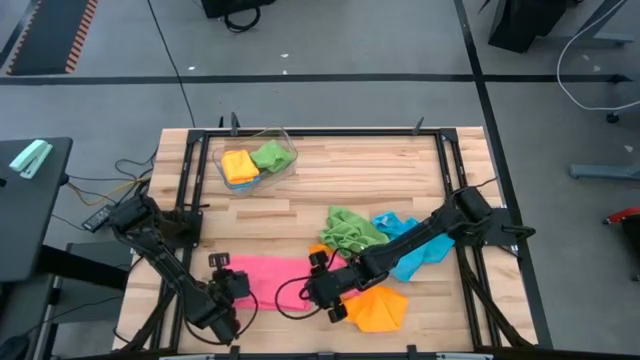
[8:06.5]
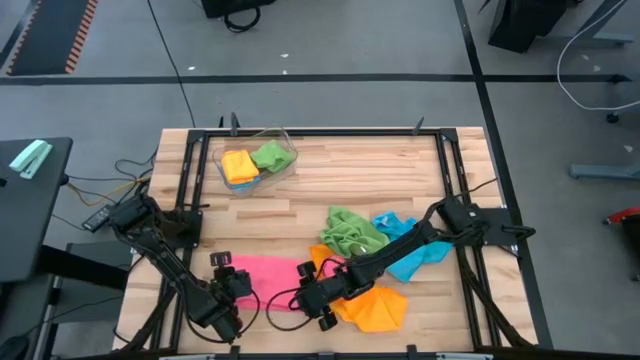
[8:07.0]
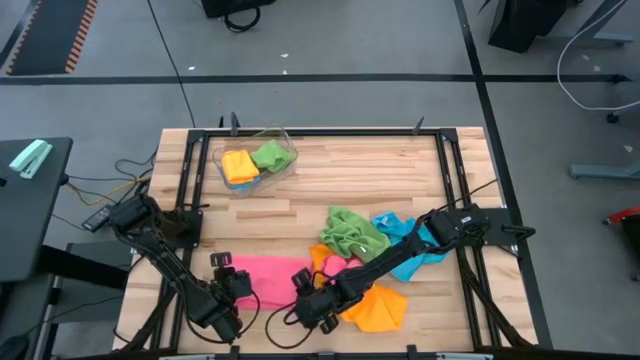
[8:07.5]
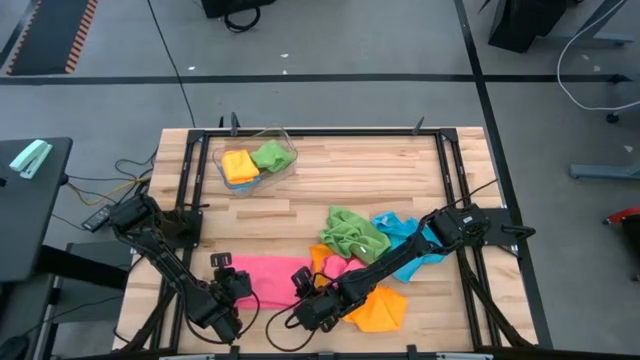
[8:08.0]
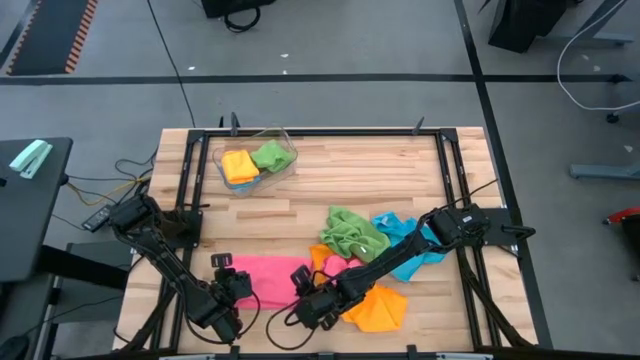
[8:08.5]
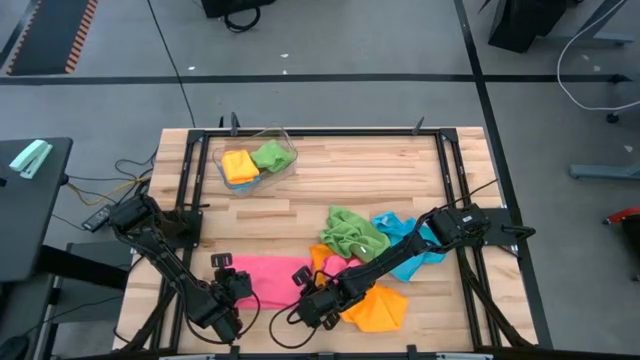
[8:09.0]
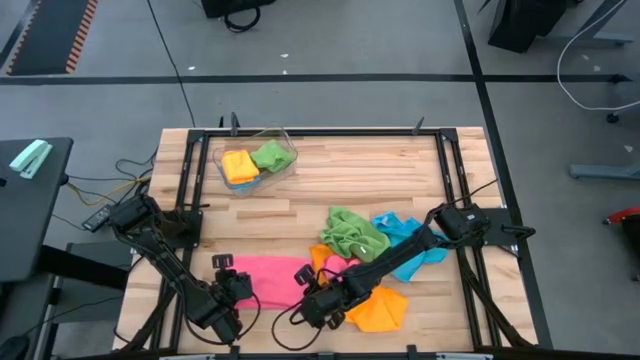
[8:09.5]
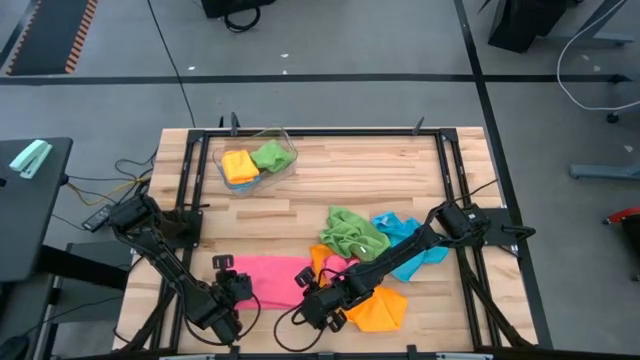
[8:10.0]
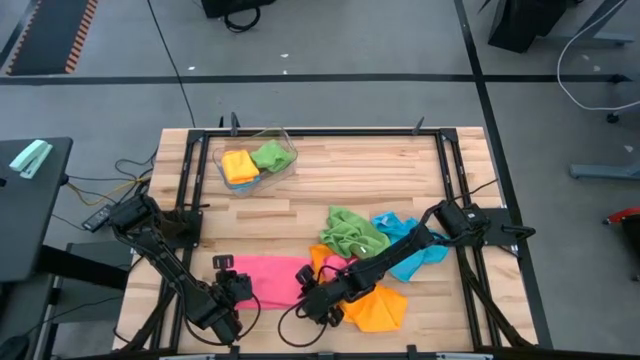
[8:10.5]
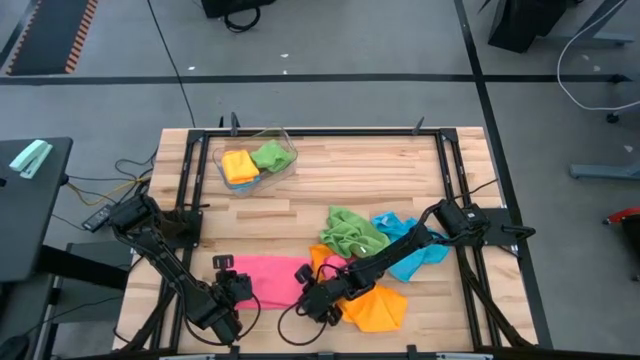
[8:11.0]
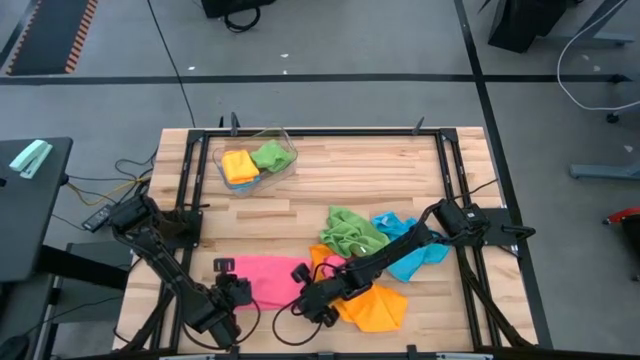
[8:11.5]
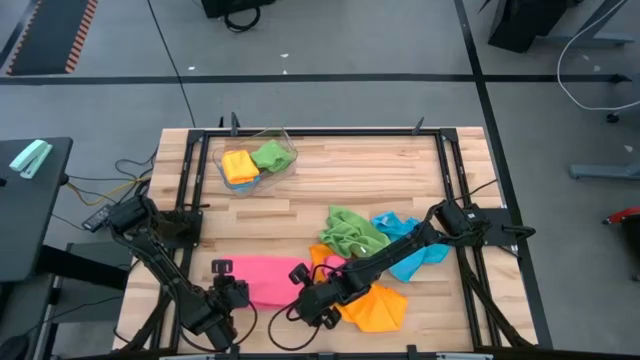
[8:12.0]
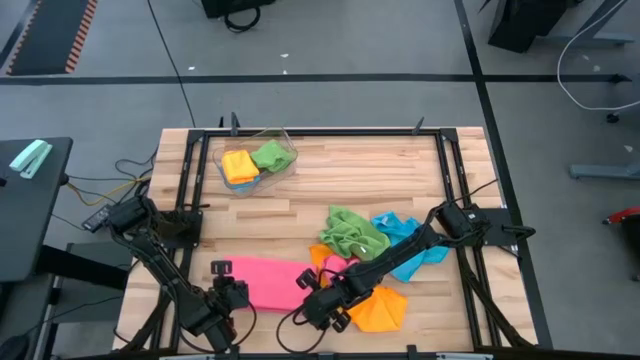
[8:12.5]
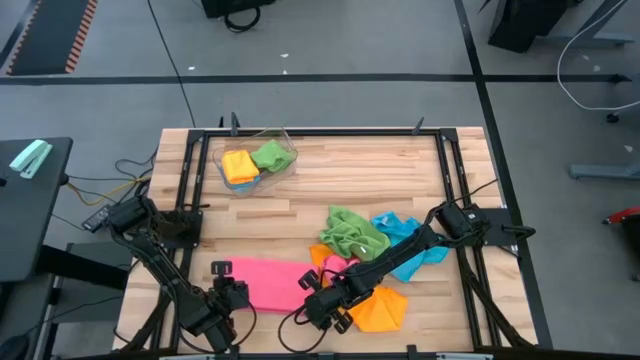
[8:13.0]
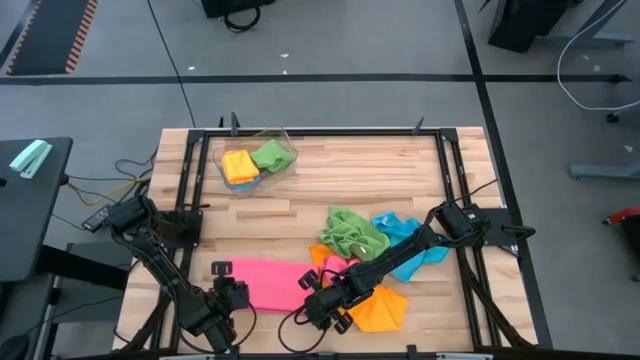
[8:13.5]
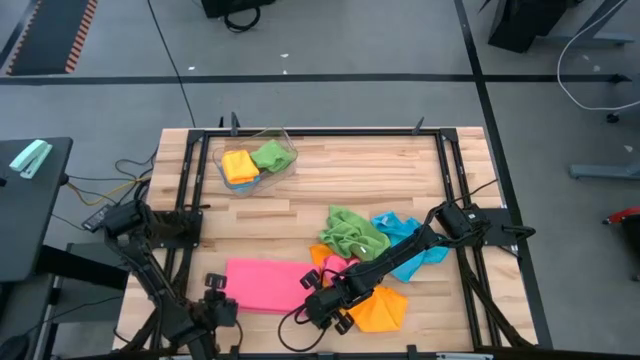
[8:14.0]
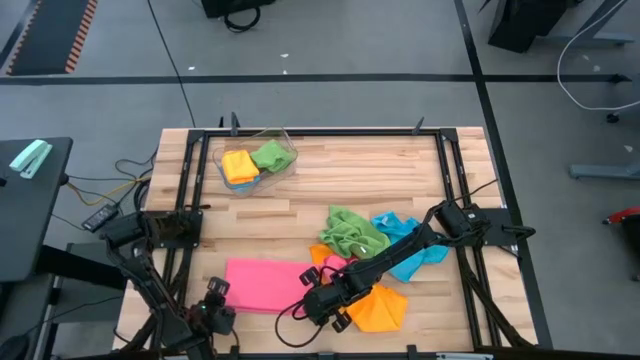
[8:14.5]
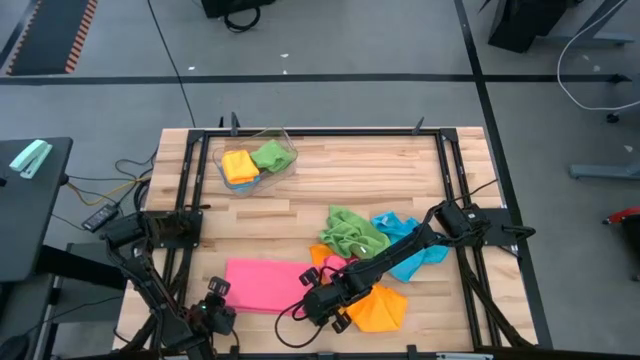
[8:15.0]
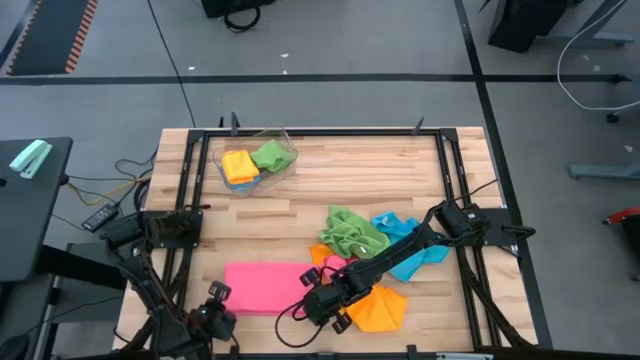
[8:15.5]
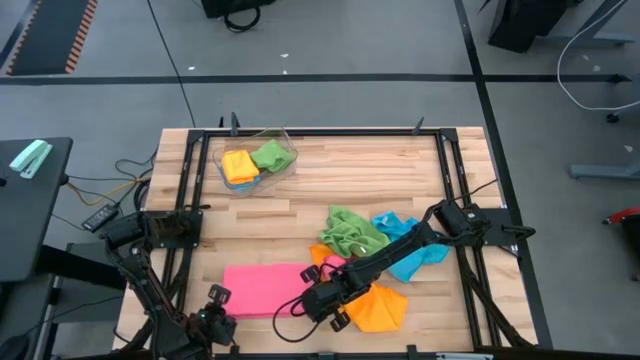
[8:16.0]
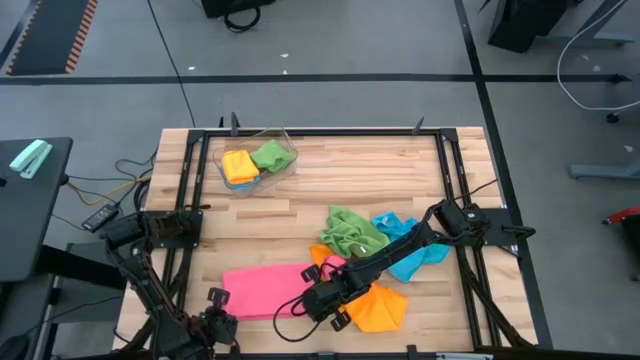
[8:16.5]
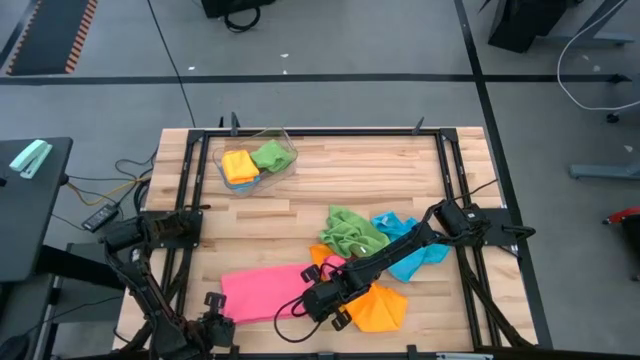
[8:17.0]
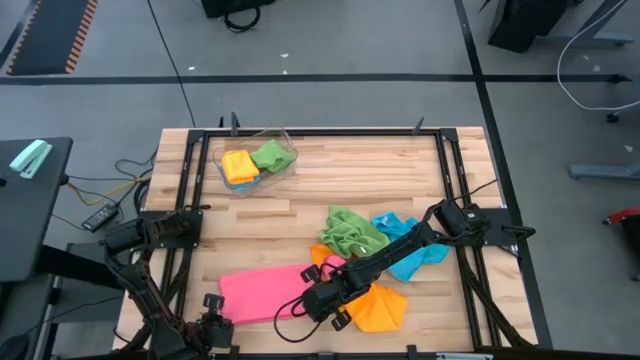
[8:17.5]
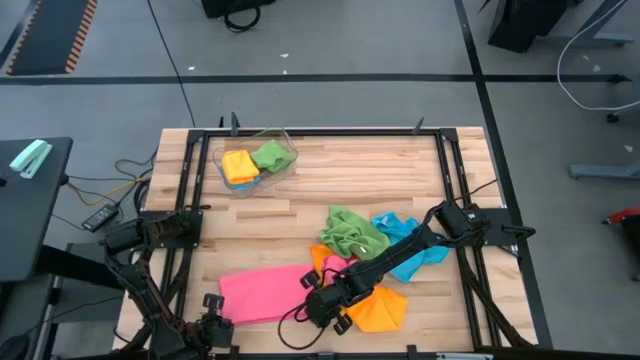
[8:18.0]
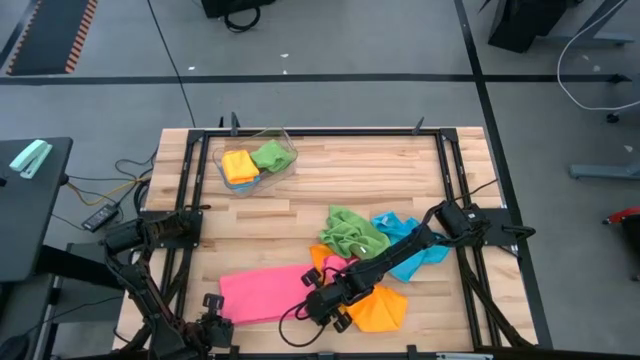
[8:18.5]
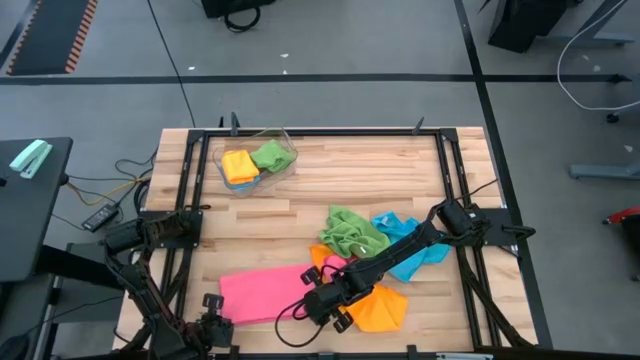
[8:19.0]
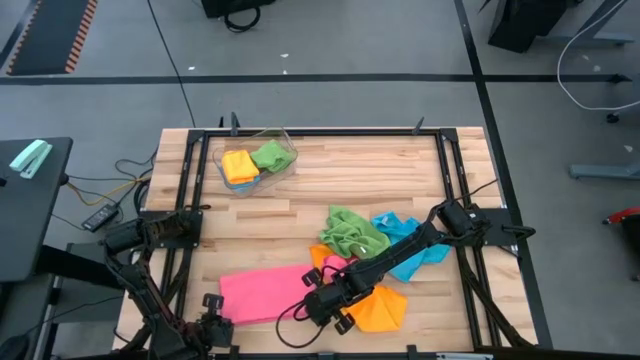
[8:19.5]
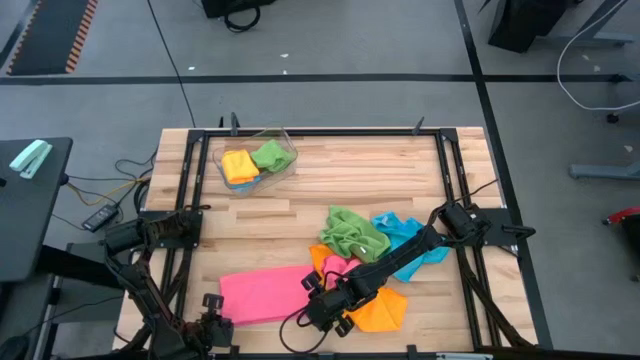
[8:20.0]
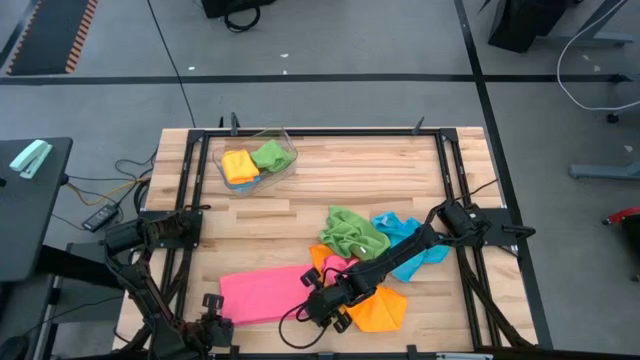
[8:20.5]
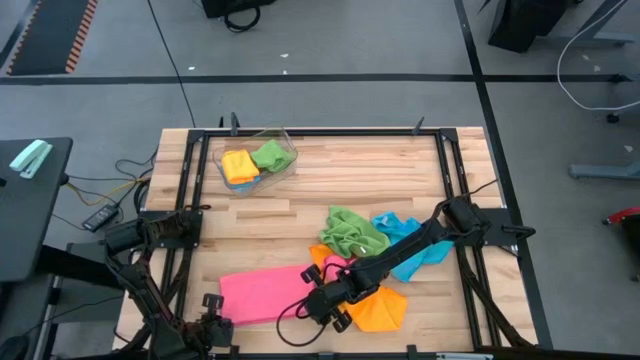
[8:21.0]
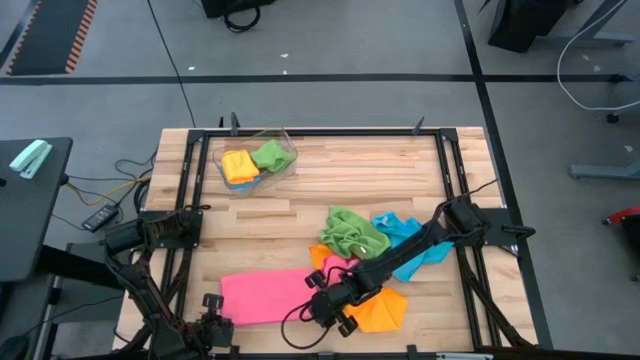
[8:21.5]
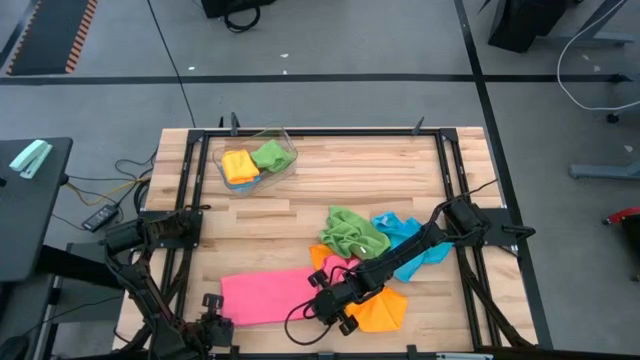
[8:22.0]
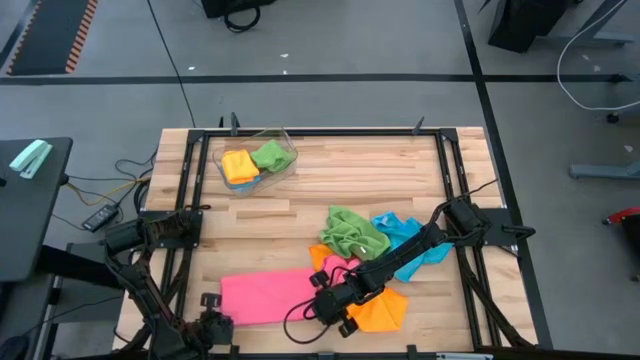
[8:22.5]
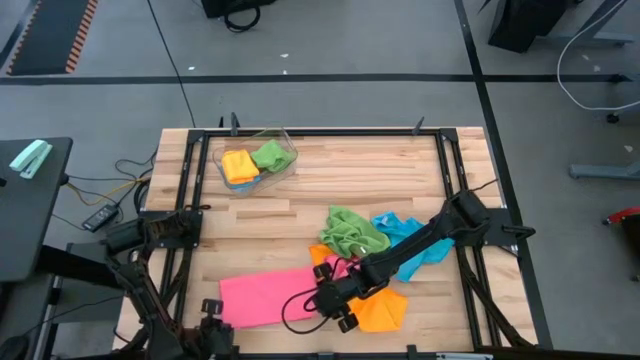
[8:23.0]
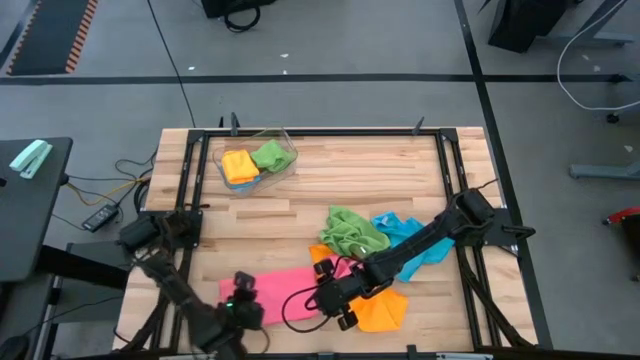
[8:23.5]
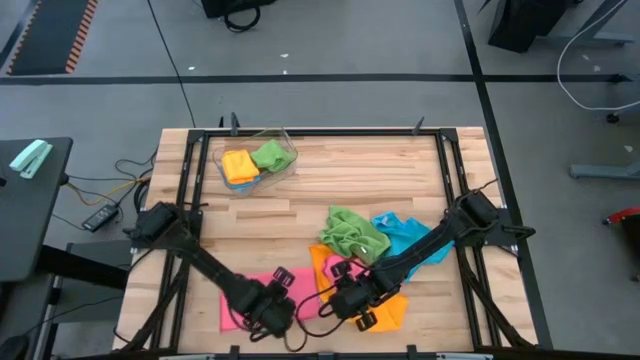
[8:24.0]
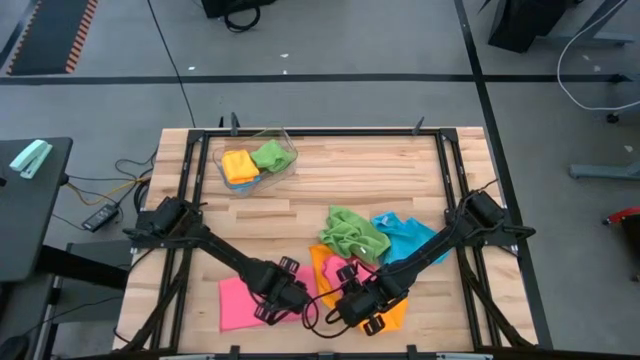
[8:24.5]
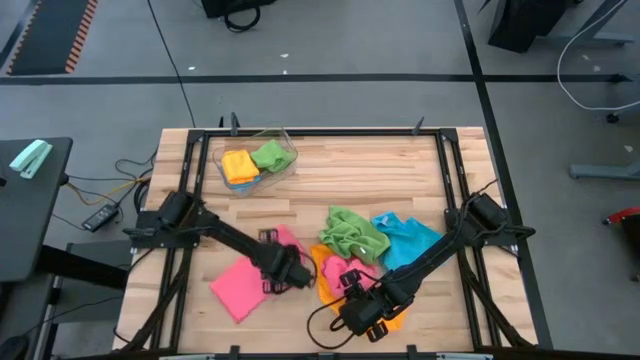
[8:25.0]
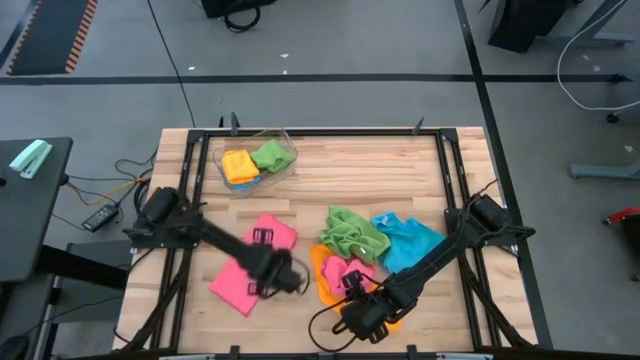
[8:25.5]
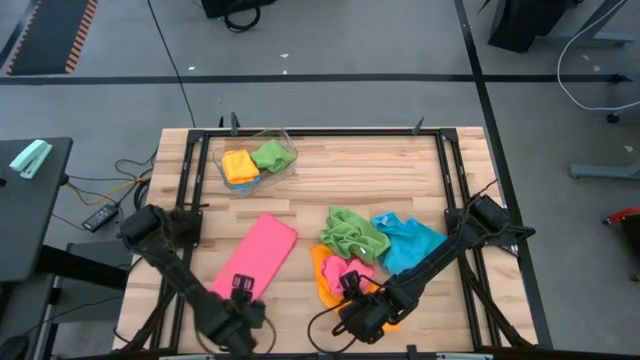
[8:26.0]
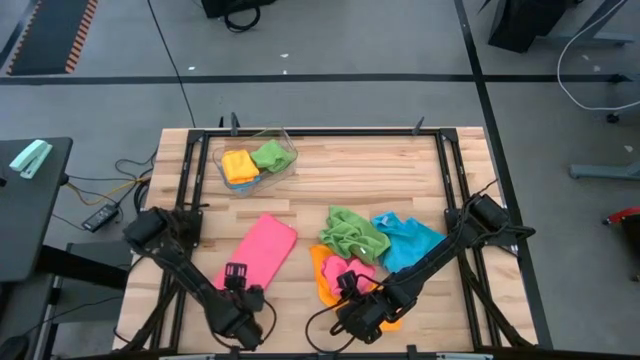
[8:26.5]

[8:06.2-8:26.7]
Task: Fold microfiber towels
Fold the left pink microfiber towel
